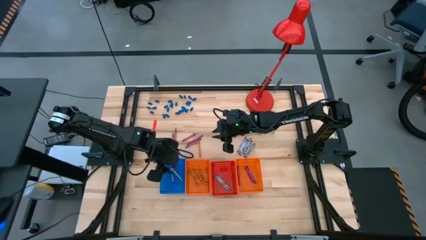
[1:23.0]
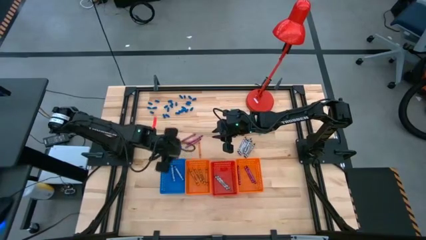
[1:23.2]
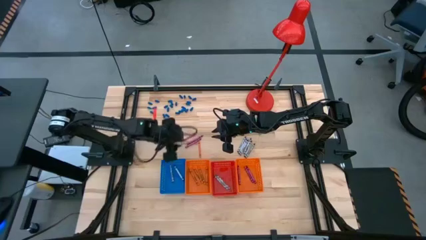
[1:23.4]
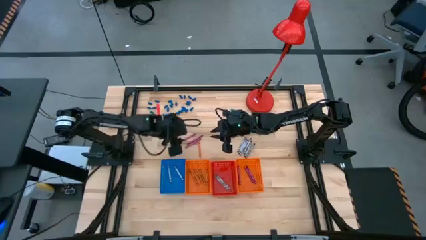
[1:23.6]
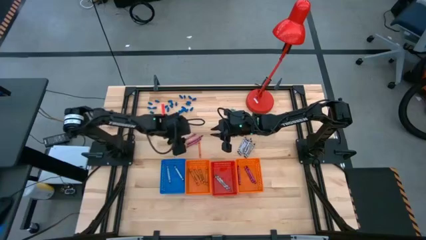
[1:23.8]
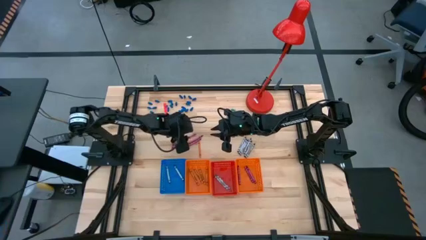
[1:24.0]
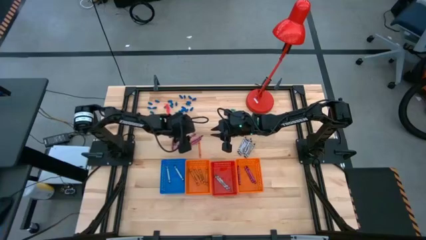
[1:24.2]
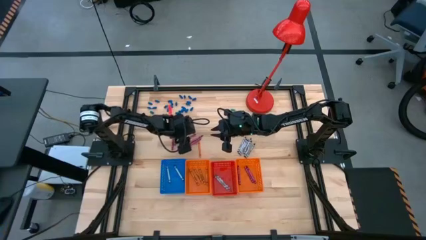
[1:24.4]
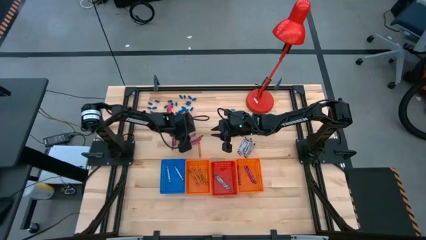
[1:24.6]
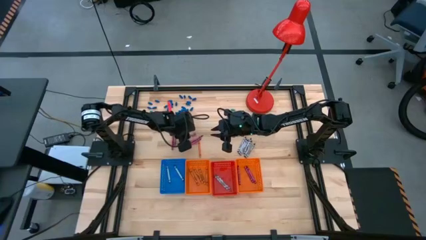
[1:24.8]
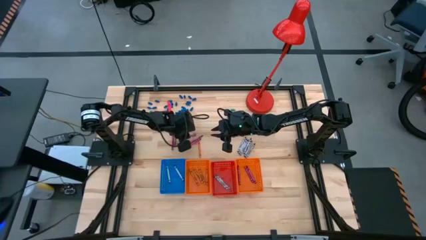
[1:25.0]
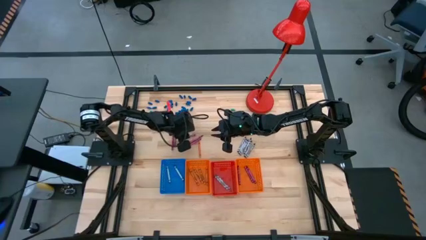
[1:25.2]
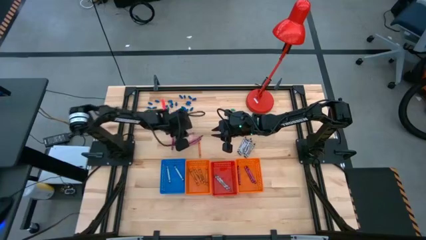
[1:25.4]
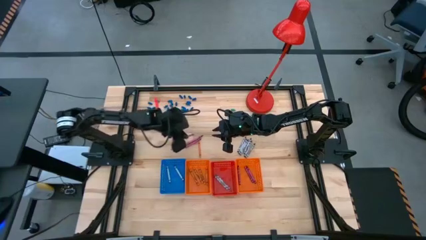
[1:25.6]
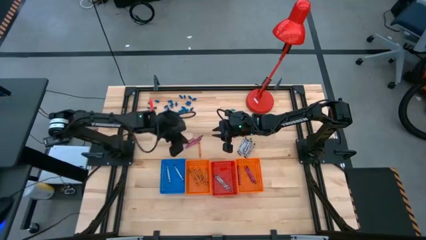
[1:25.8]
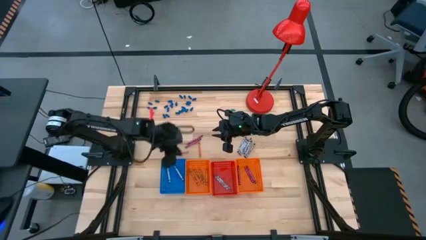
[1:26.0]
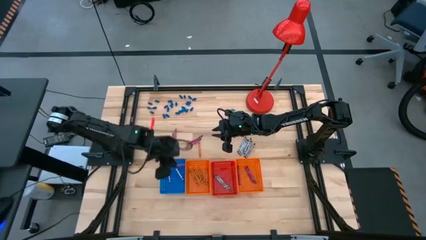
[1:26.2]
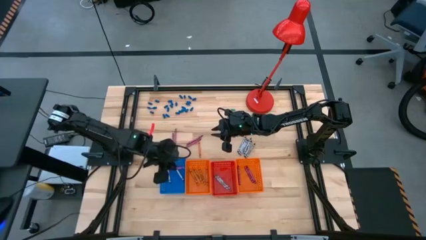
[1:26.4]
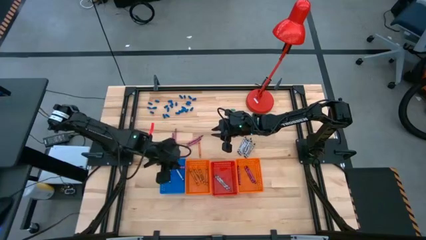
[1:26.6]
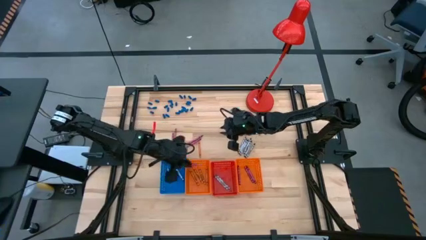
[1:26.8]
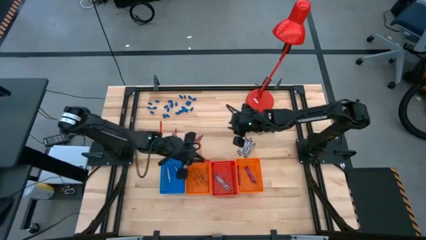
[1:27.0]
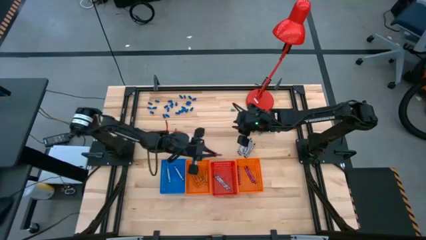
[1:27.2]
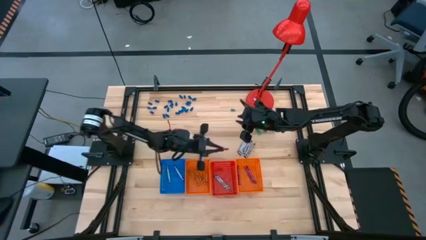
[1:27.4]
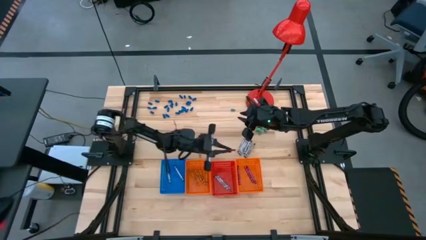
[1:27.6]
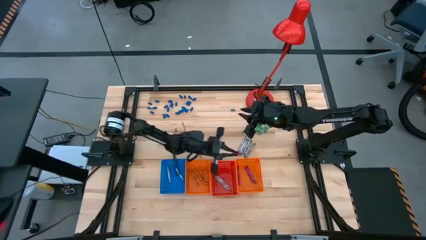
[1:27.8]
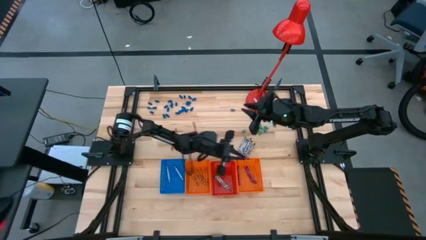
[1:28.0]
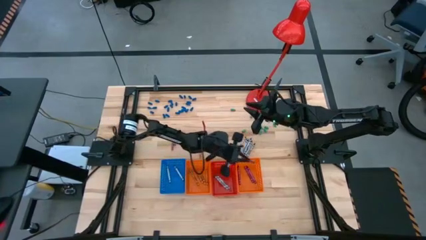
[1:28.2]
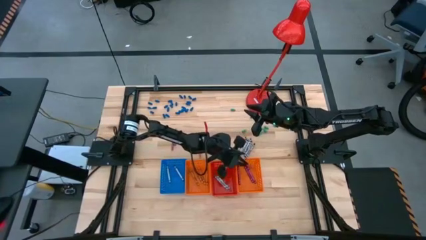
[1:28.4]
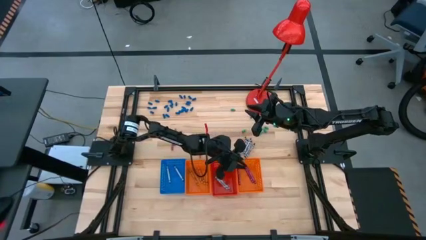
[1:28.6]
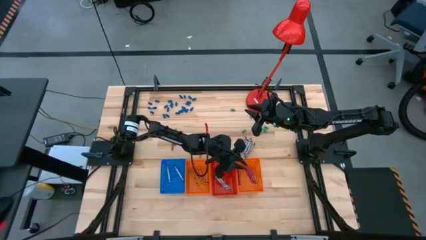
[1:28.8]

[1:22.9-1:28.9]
Task: Sort crayons
Put the red crayon into the right orange bin

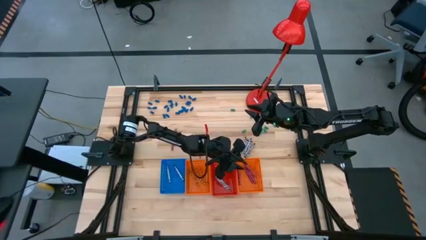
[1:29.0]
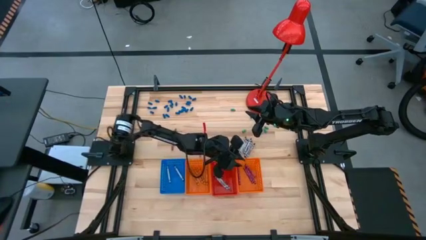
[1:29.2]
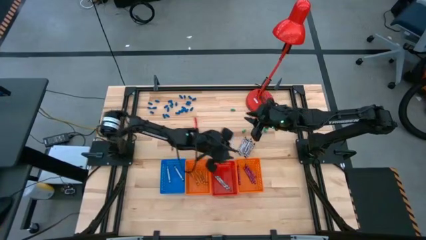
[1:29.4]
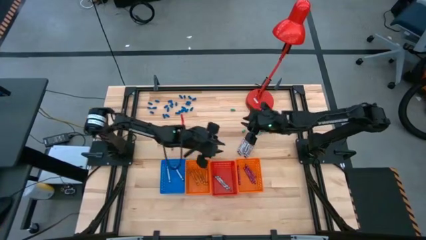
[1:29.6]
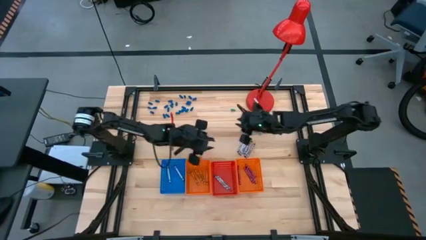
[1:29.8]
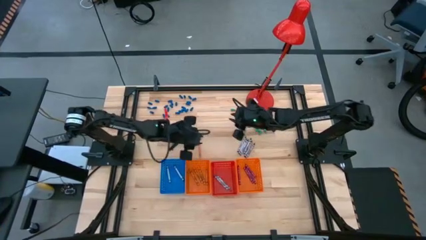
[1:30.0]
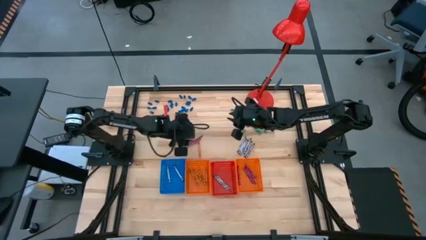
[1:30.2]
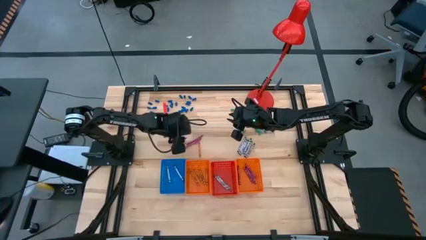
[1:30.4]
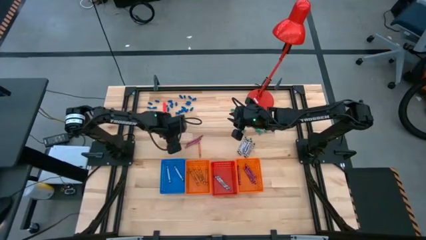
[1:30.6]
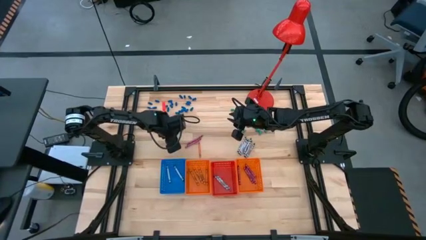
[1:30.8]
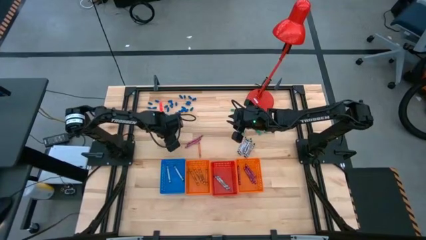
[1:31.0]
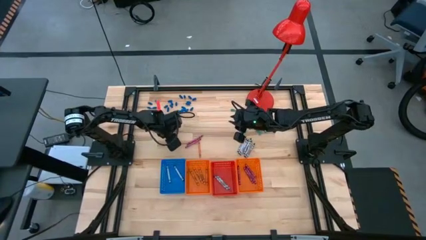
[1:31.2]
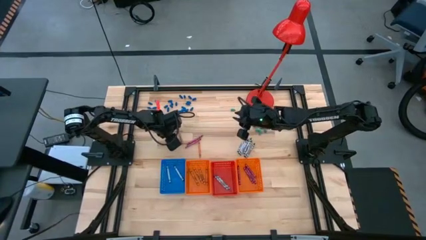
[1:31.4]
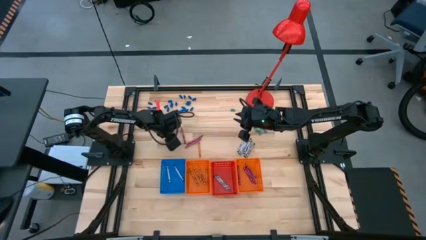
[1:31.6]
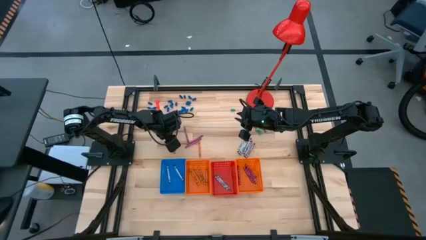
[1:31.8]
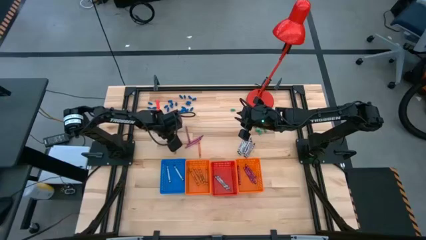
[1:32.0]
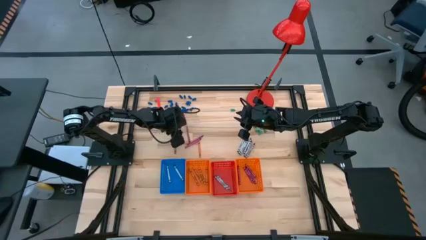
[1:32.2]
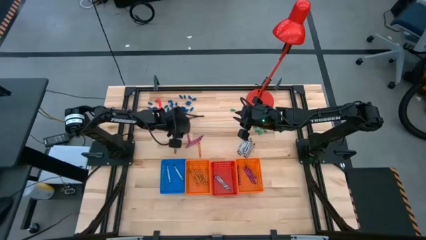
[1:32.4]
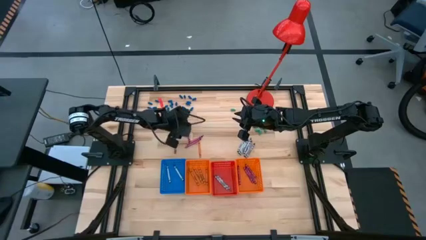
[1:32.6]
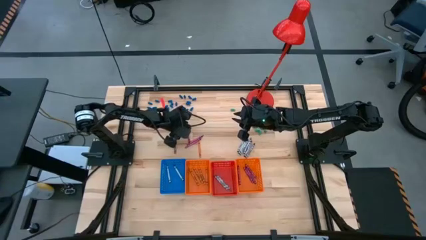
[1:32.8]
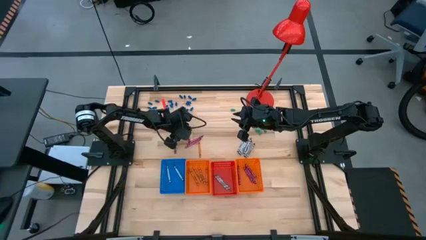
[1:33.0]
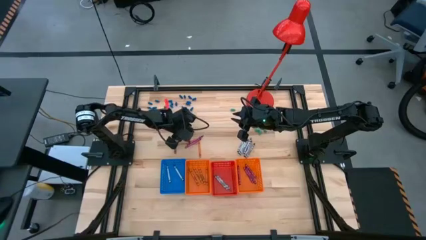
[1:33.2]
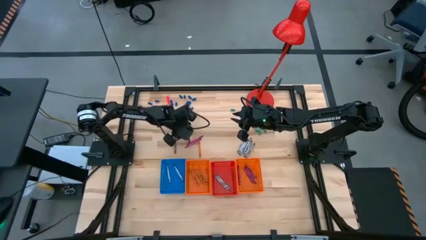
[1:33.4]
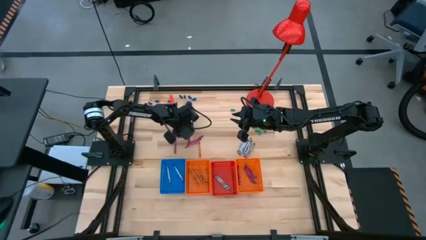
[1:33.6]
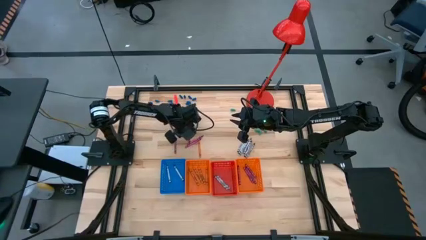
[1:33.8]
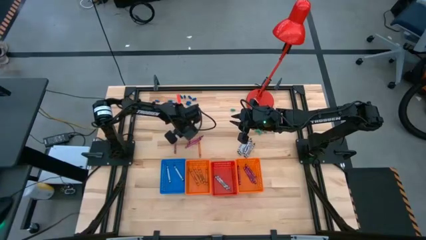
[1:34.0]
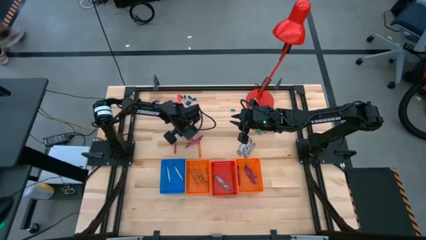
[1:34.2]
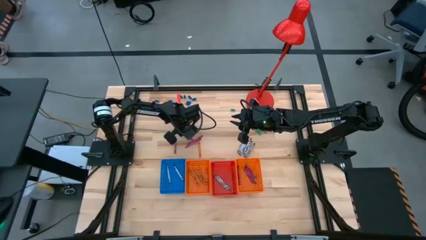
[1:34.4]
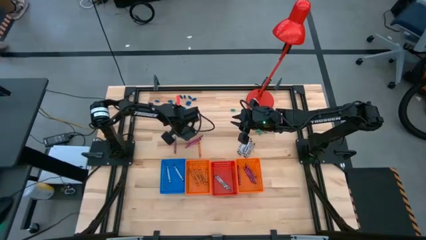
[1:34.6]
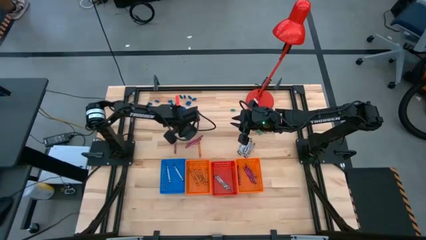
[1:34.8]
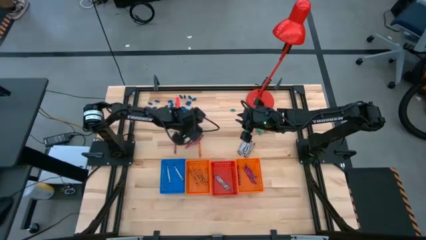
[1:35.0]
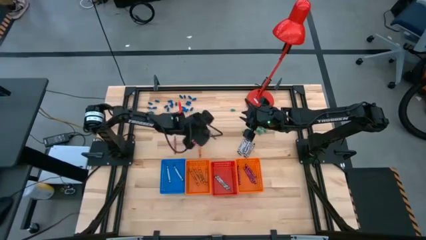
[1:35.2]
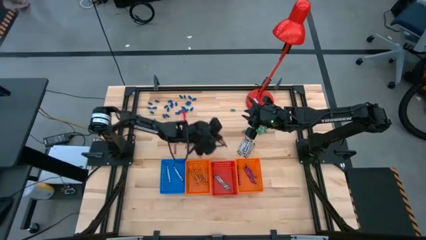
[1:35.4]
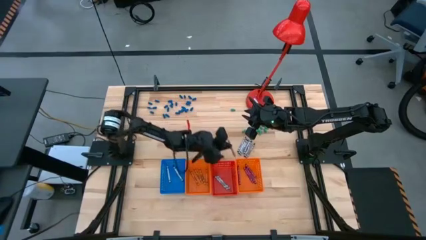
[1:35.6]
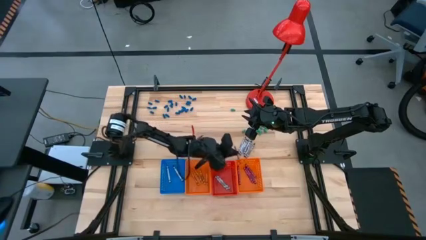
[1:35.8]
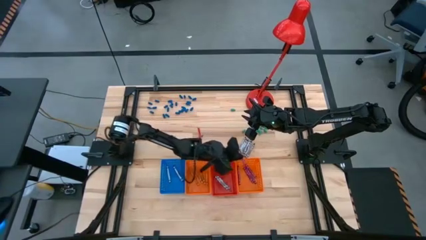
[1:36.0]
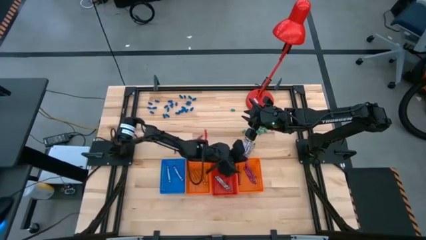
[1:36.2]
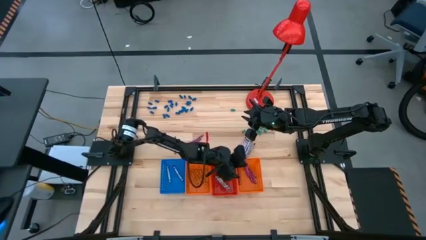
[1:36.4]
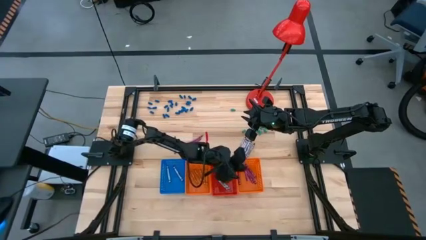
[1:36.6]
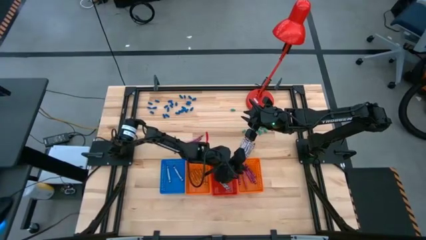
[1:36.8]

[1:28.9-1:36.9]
Put the red crayon into the right orange bin

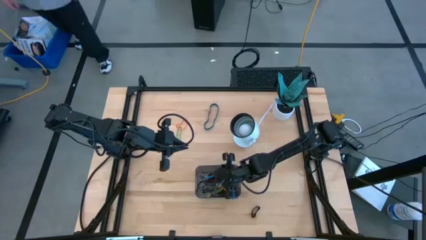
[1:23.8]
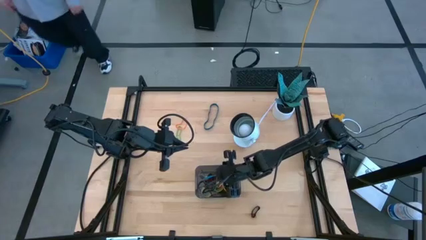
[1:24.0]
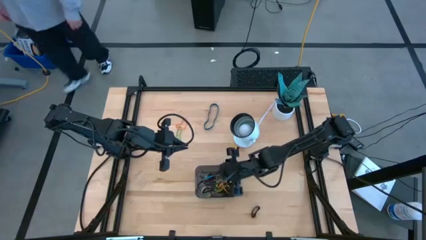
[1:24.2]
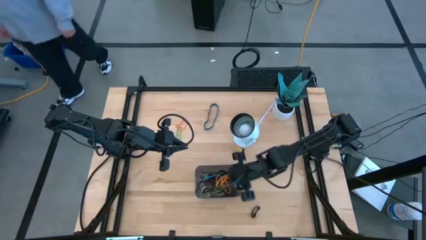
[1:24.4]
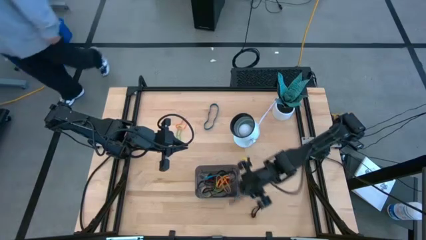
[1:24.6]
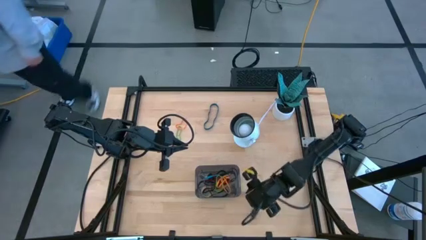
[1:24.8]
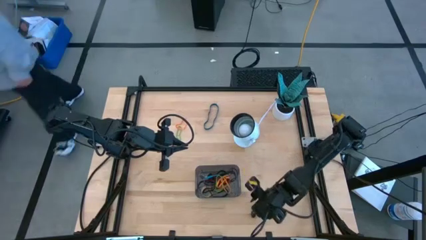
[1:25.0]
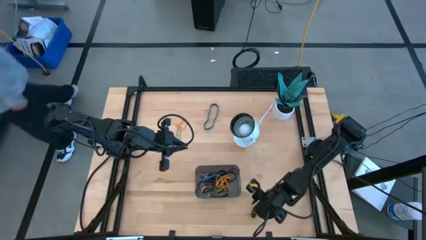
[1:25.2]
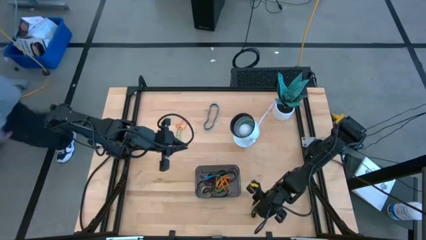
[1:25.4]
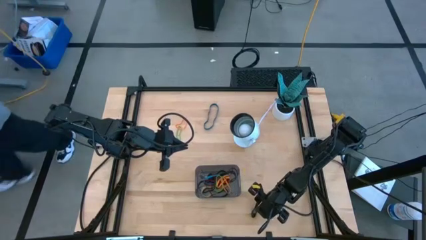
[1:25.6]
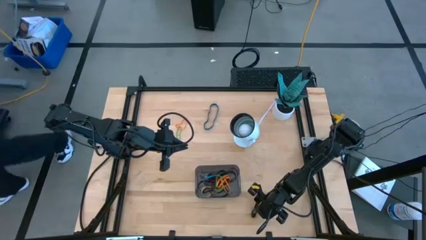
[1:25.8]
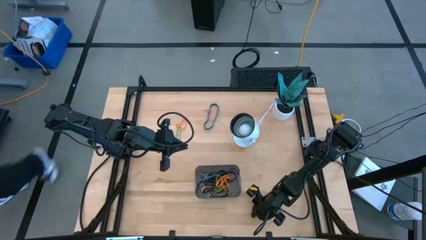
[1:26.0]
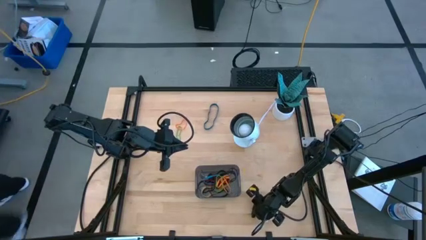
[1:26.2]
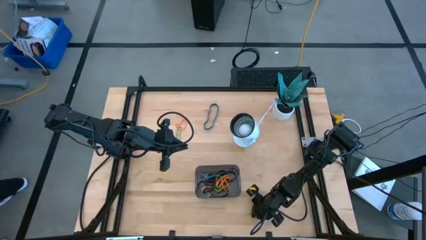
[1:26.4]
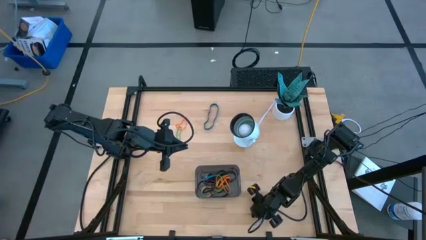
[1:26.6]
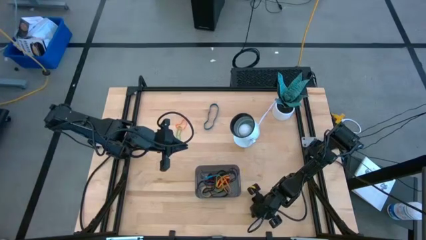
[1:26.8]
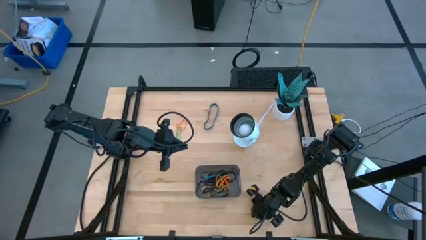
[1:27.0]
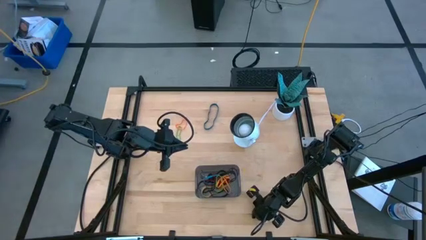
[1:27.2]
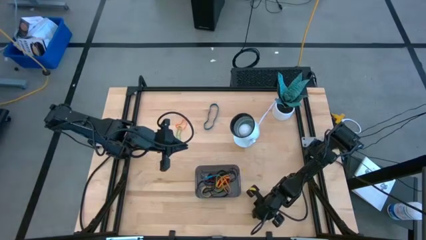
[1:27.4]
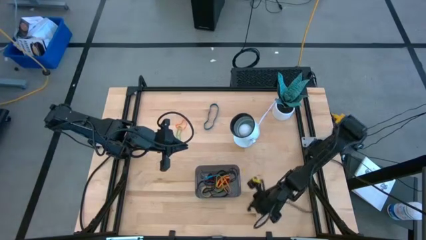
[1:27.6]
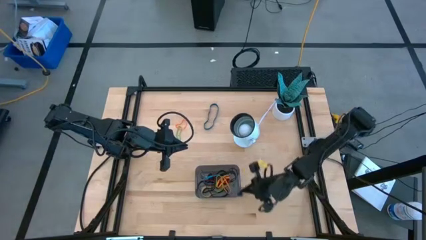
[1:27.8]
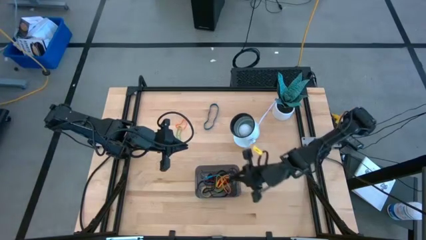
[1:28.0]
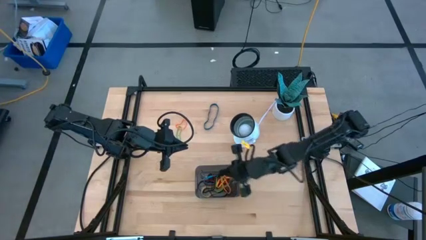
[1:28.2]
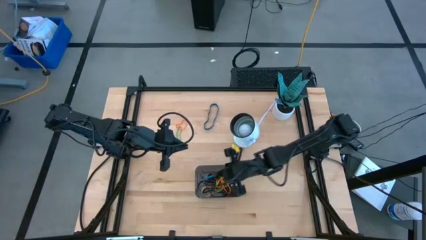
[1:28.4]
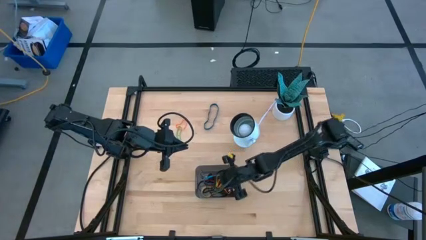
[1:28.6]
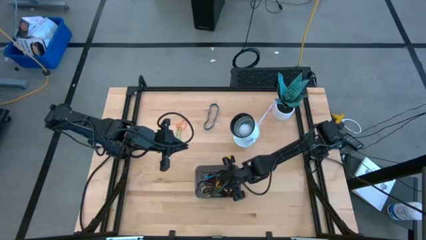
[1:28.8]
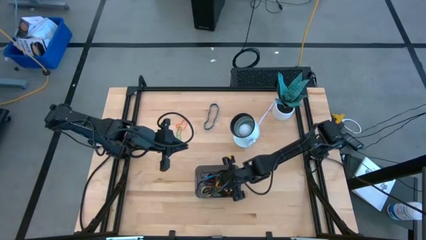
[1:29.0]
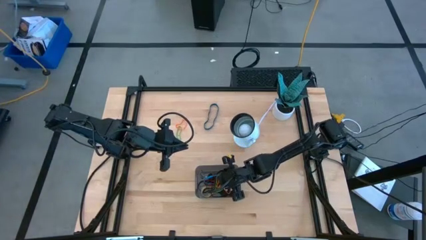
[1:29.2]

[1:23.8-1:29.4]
Task: Pick and place rubber bands into bin
Put the small black rubber band into the black bin
